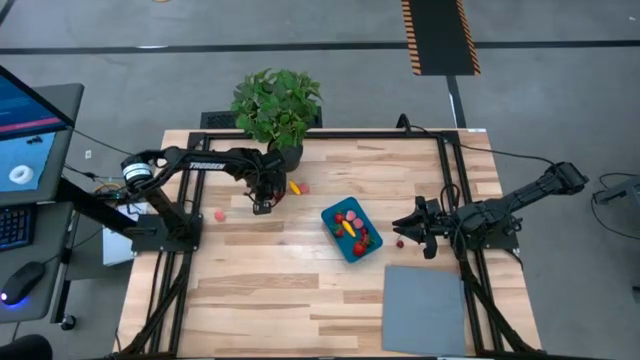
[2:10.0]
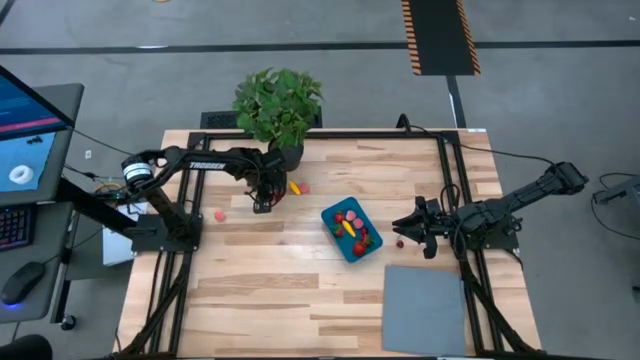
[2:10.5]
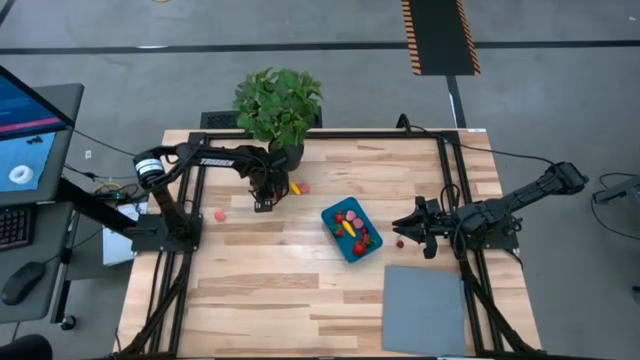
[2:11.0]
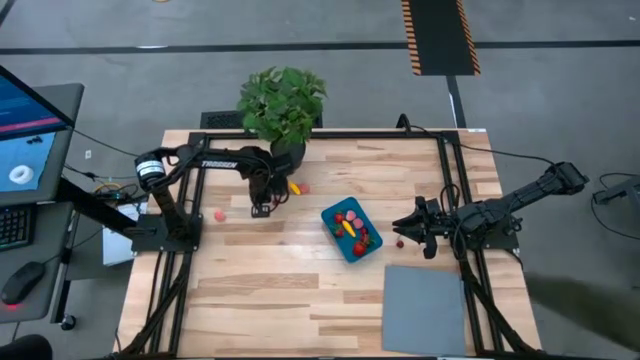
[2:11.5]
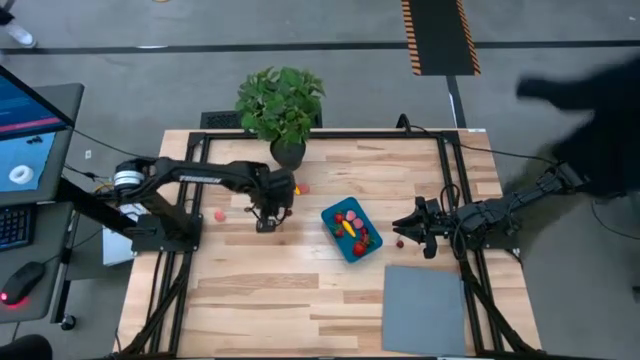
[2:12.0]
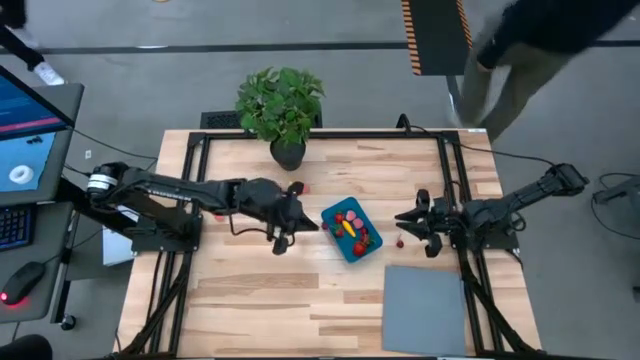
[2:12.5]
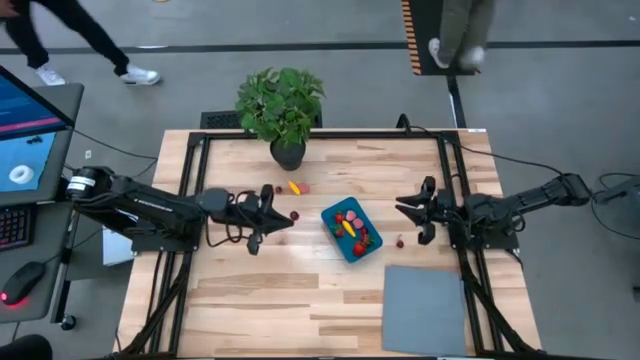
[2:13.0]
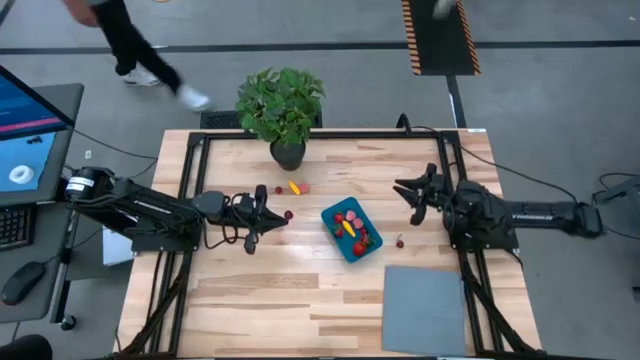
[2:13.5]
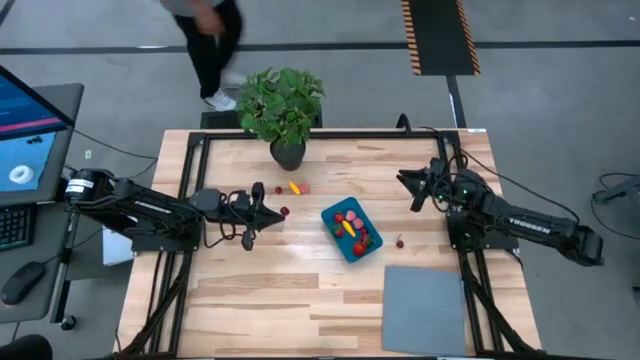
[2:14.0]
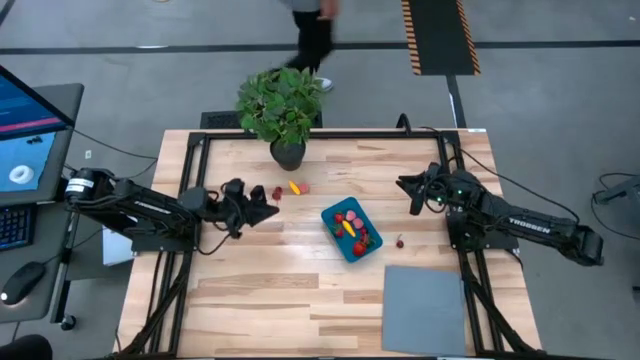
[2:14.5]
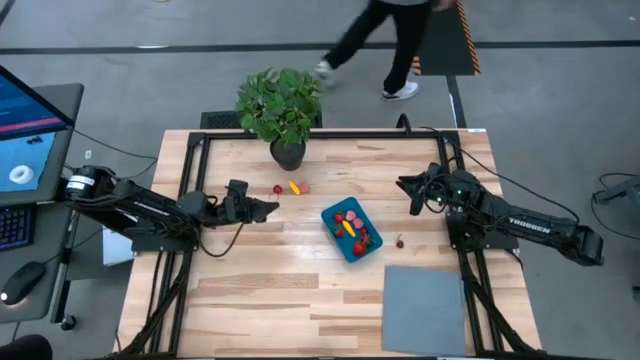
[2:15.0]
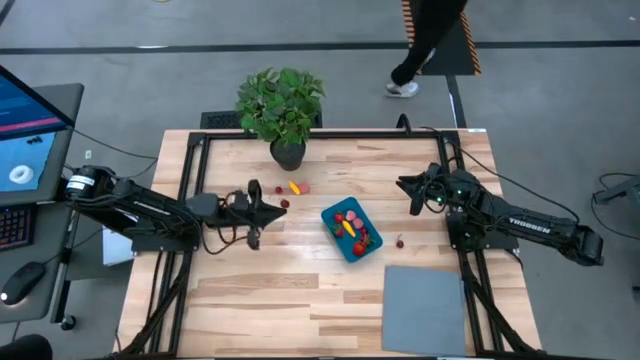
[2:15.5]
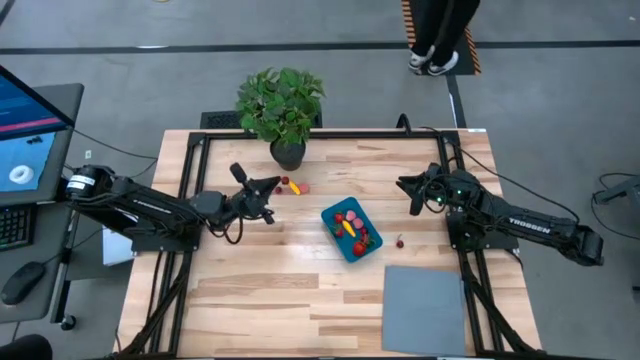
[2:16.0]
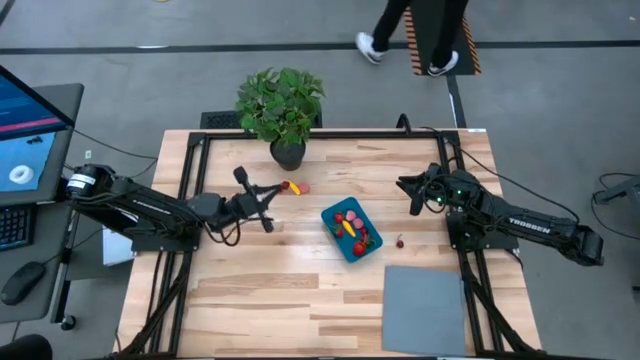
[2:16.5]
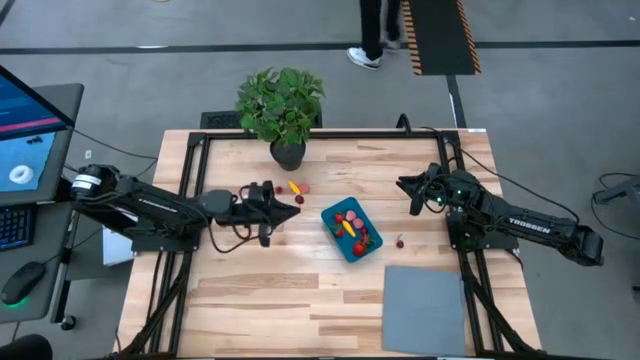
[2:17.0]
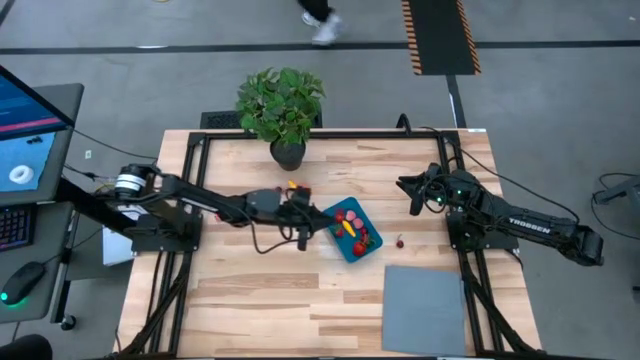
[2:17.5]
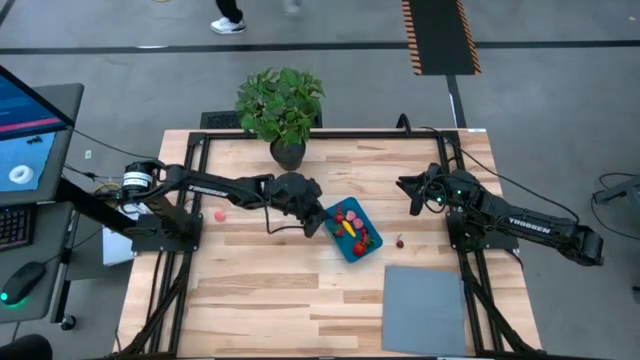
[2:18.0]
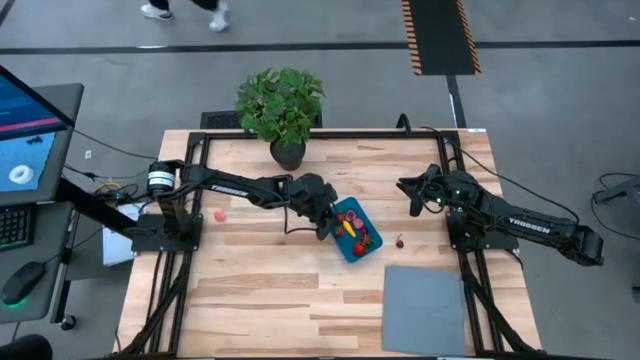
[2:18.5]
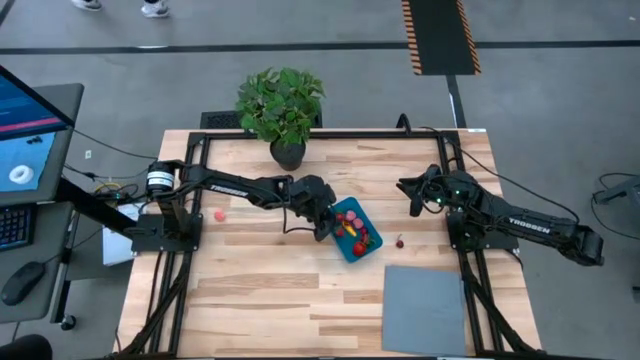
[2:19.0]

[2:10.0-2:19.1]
Task: Pick and placing Produce into tupperware
Put the middle cherry into the blue bin

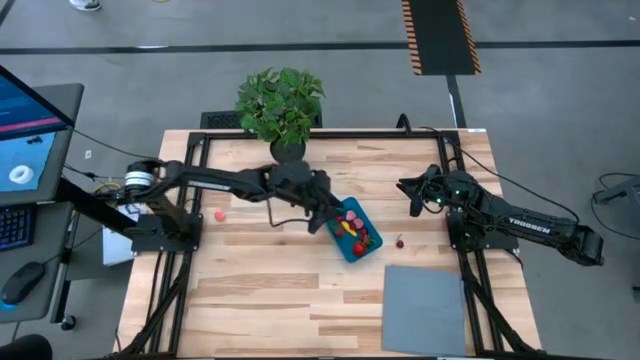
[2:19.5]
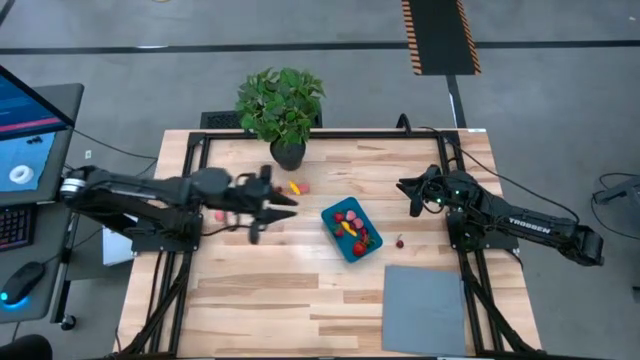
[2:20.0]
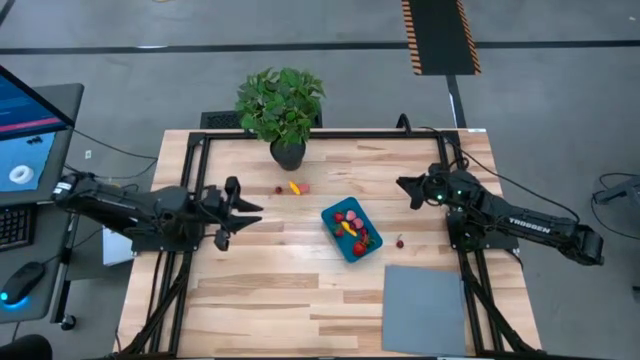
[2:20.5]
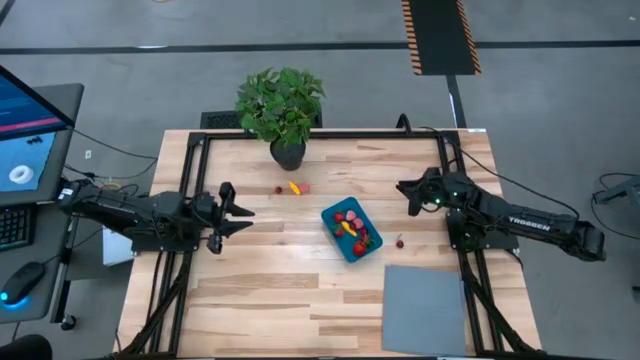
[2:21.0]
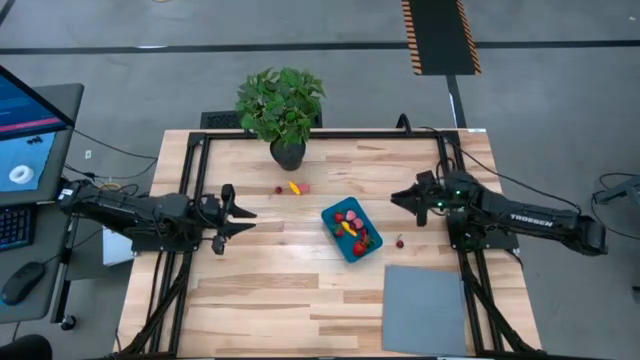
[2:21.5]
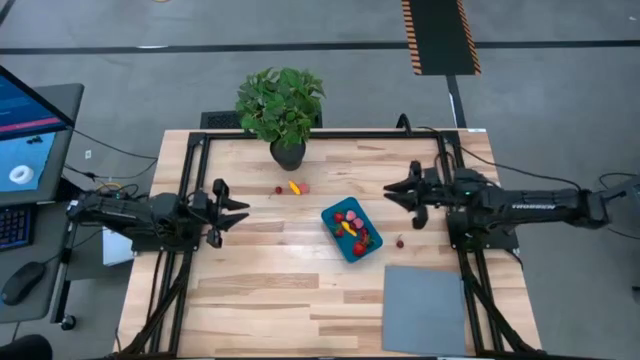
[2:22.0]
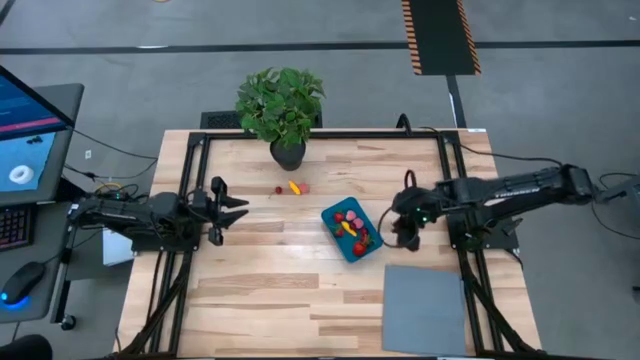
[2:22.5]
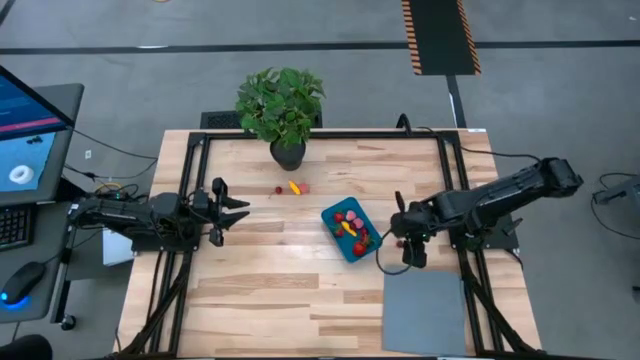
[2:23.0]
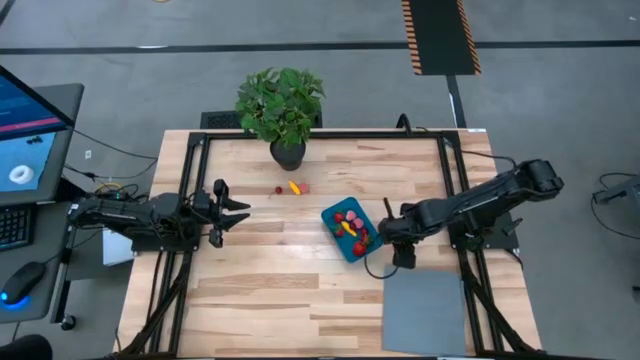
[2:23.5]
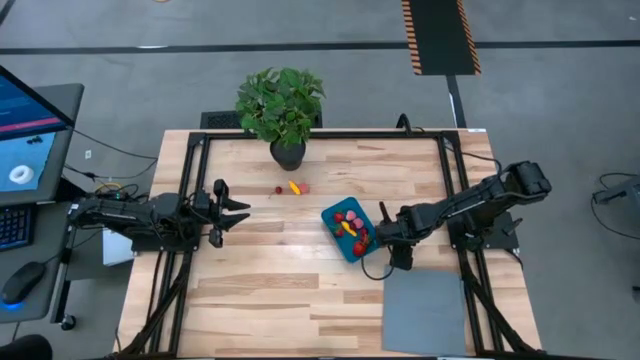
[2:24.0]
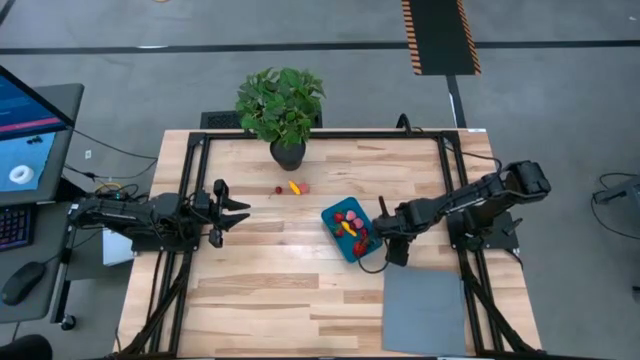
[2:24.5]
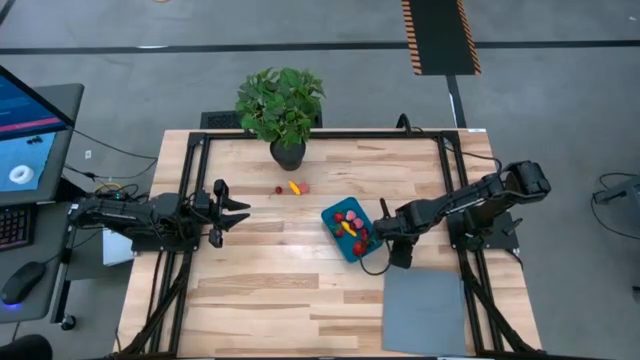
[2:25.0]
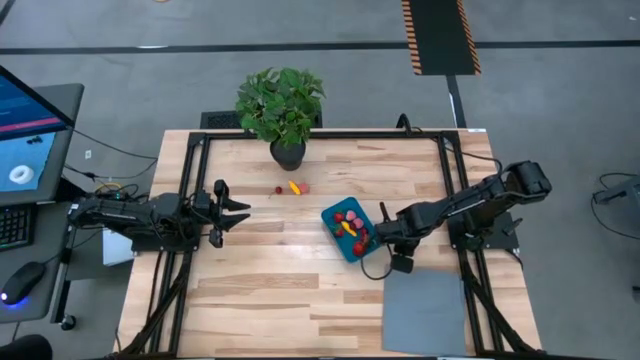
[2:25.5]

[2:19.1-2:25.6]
Put the bottom cherry into the blue bin

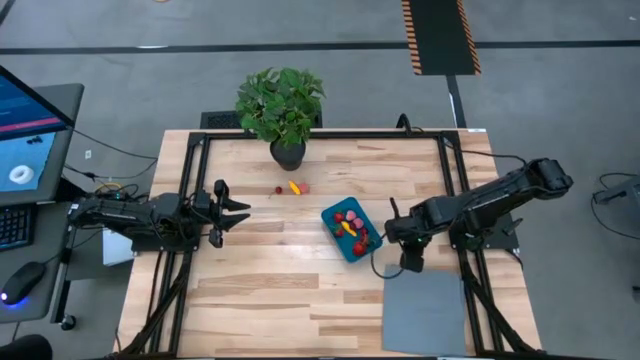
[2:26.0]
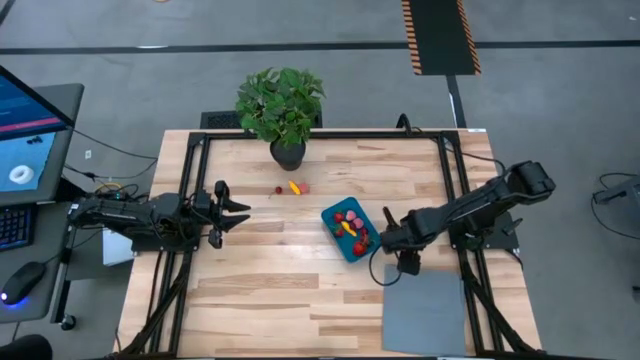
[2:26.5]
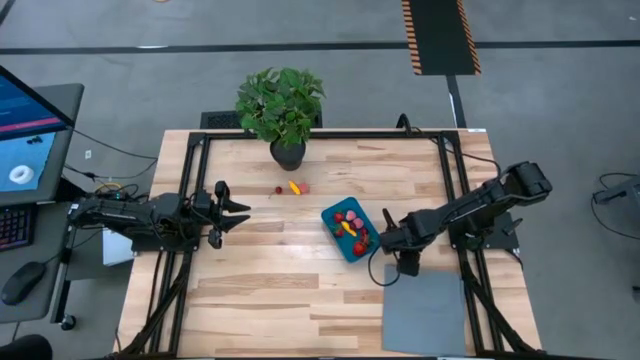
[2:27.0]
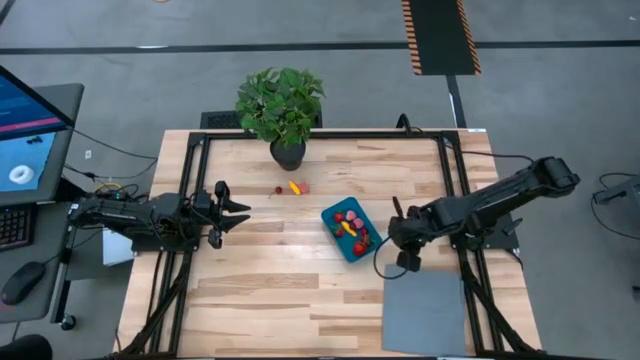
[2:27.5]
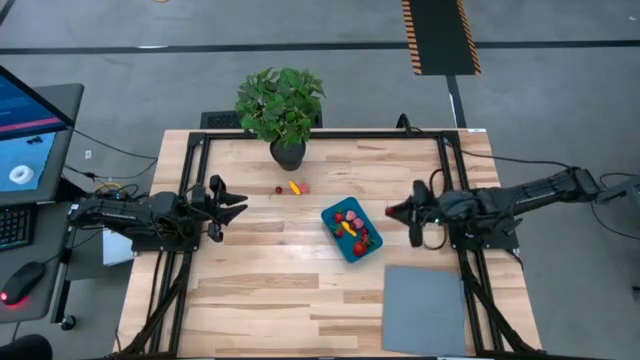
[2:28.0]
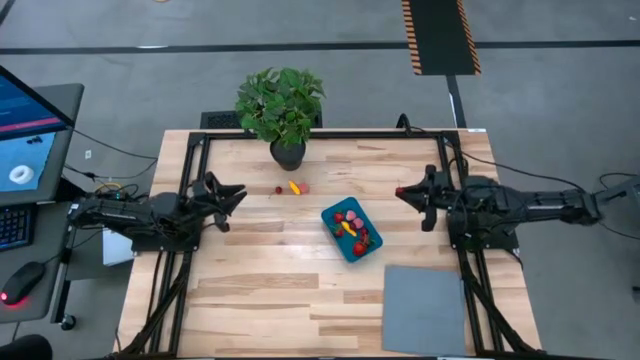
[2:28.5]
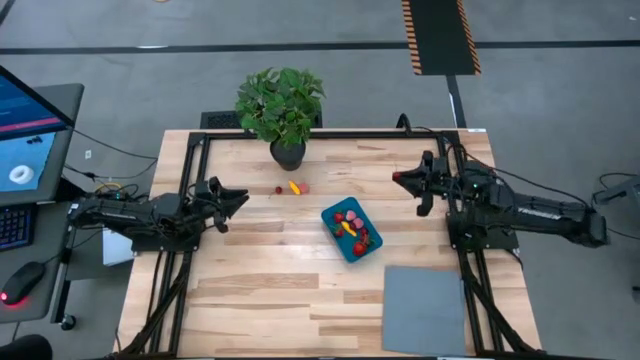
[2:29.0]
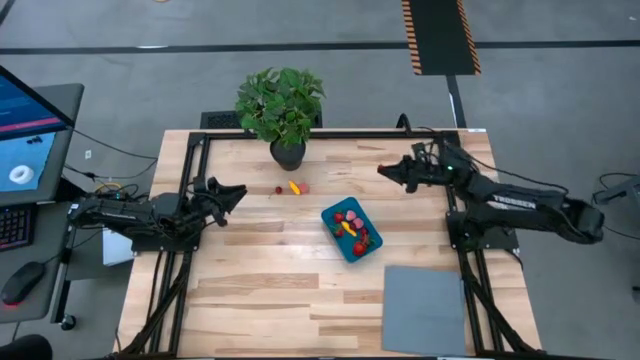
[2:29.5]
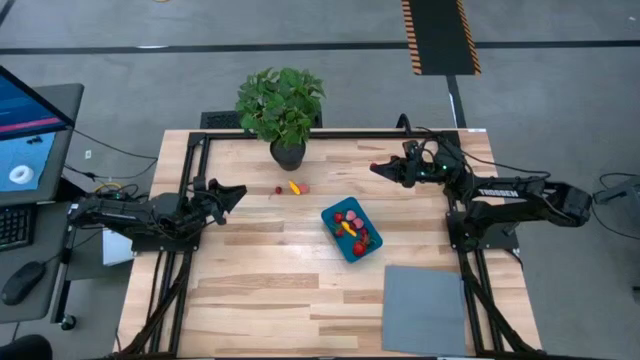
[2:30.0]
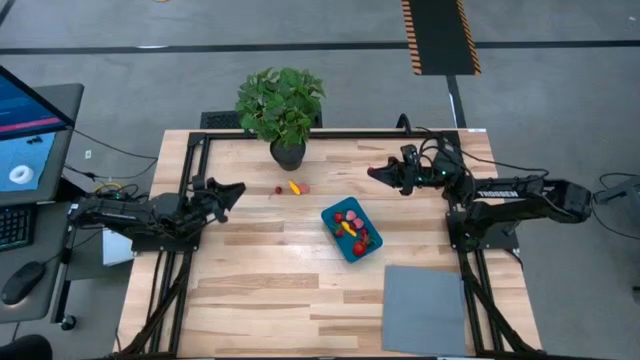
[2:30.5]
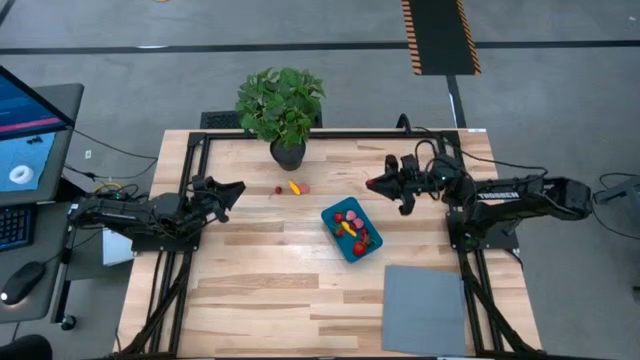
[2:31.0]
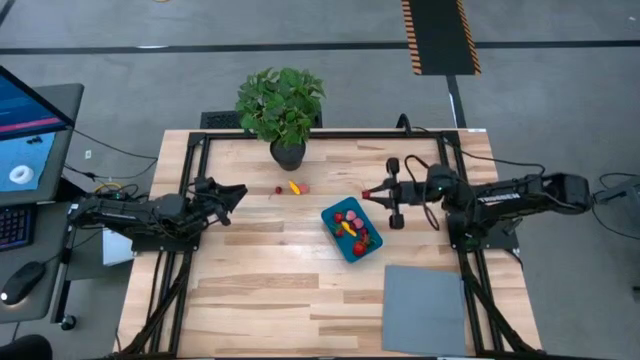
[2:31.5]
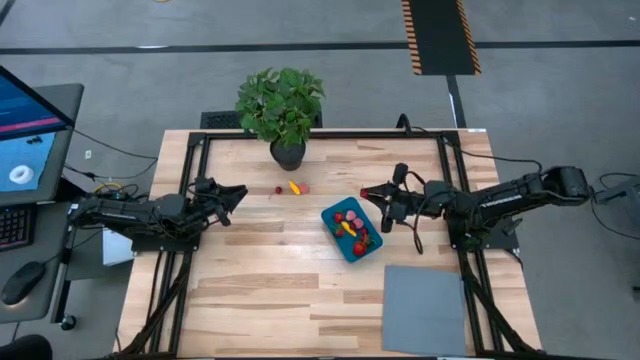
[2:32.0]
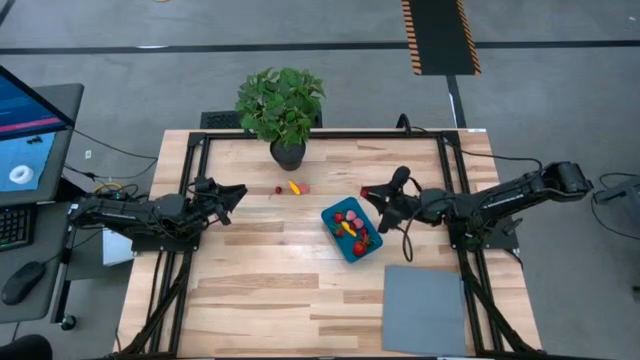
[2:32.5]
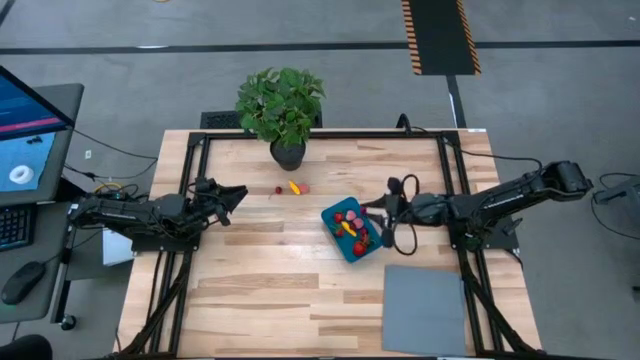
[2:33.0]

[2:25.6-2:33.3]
Put the bottom cherry into the blue bin
